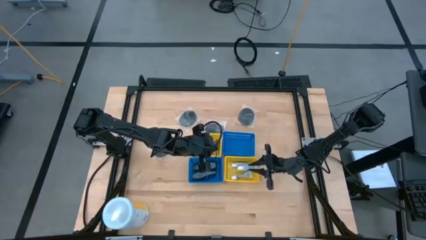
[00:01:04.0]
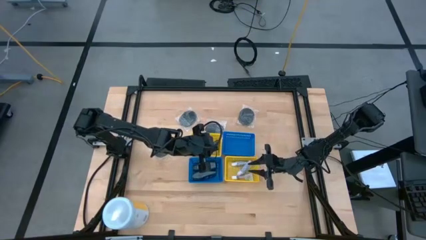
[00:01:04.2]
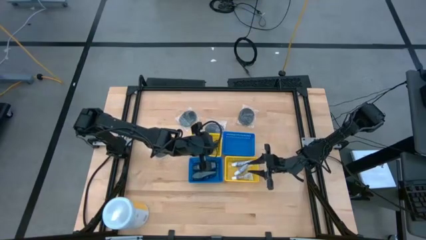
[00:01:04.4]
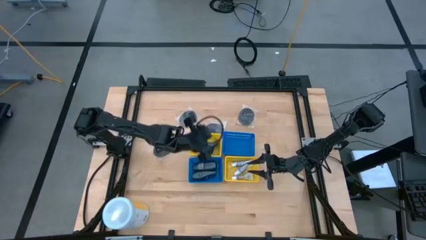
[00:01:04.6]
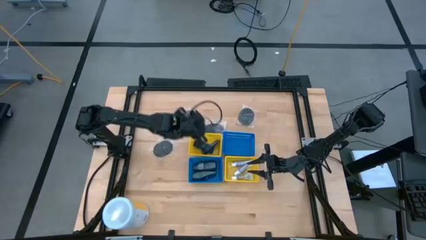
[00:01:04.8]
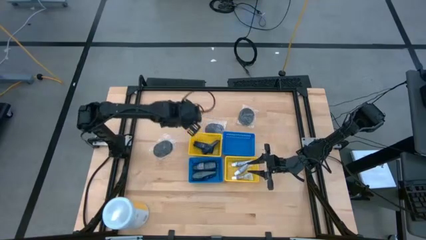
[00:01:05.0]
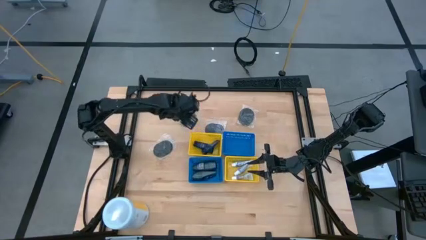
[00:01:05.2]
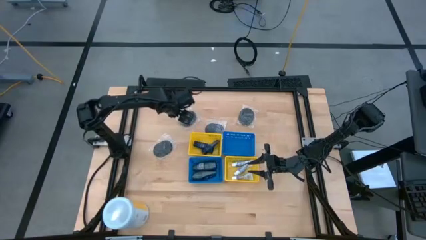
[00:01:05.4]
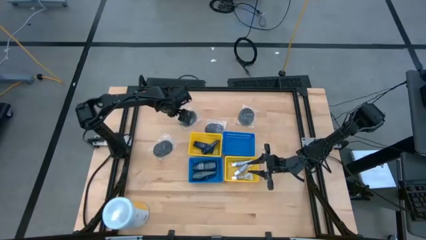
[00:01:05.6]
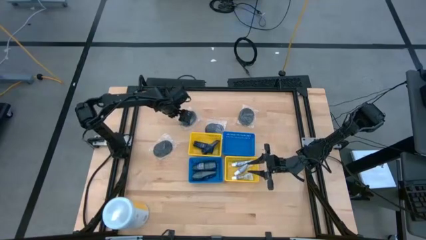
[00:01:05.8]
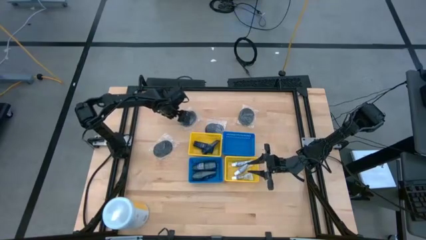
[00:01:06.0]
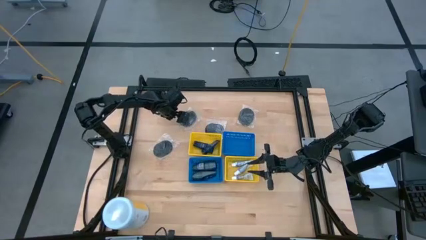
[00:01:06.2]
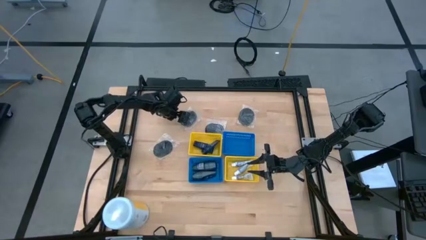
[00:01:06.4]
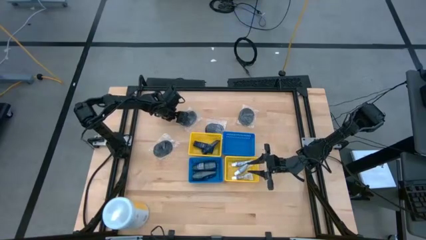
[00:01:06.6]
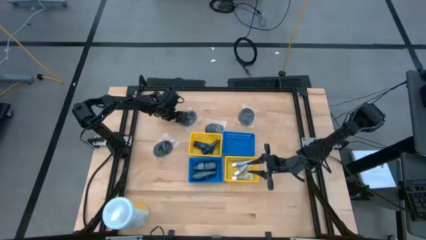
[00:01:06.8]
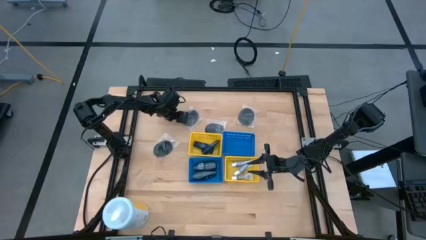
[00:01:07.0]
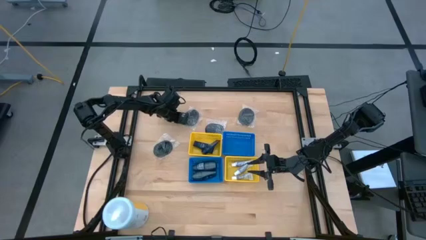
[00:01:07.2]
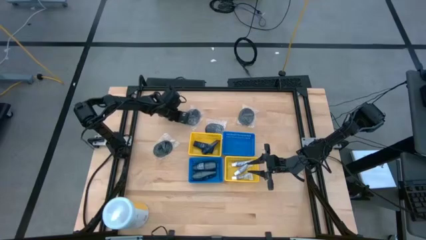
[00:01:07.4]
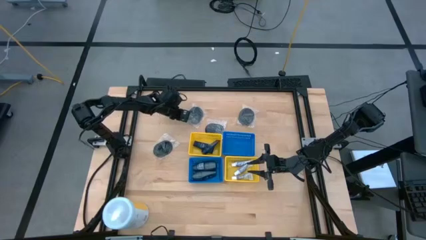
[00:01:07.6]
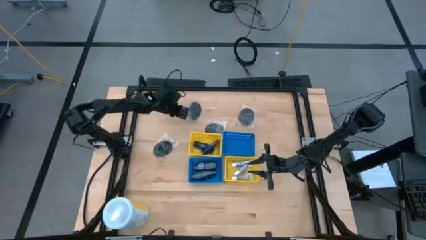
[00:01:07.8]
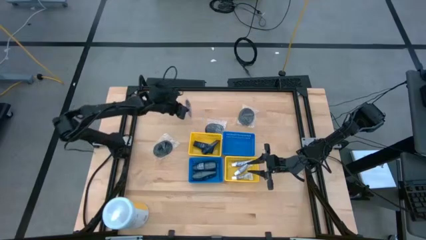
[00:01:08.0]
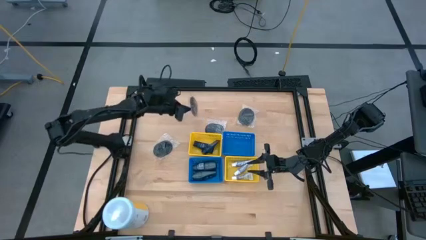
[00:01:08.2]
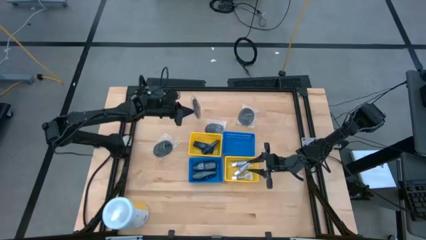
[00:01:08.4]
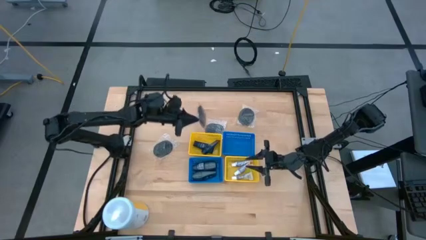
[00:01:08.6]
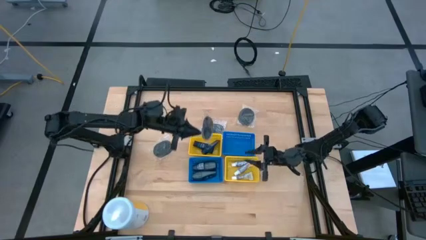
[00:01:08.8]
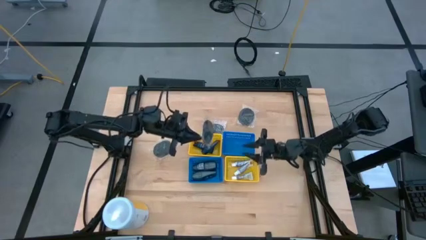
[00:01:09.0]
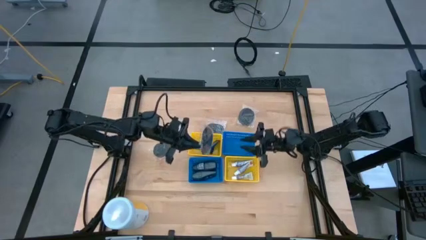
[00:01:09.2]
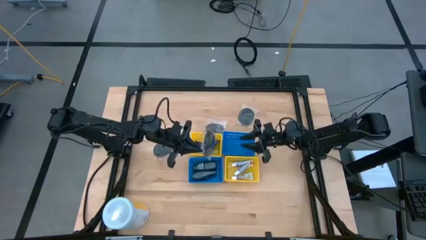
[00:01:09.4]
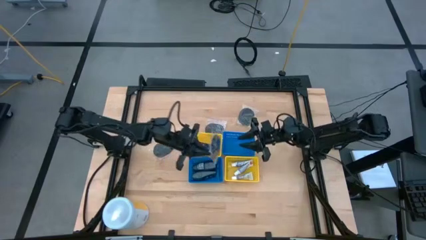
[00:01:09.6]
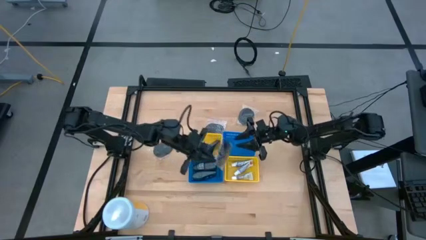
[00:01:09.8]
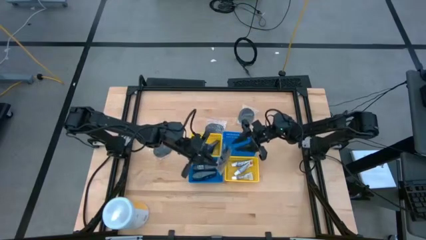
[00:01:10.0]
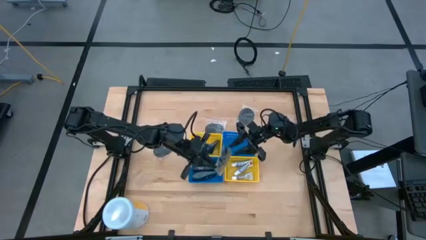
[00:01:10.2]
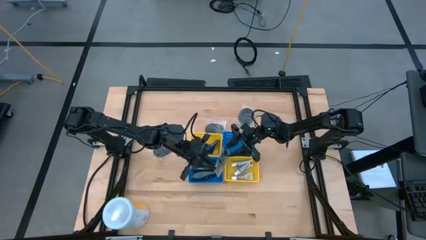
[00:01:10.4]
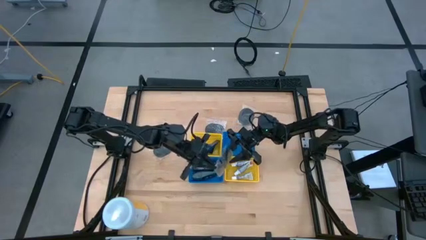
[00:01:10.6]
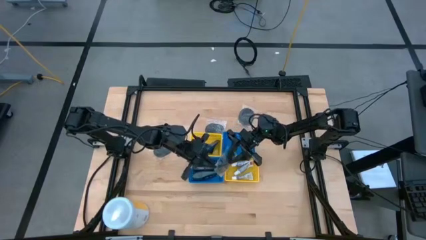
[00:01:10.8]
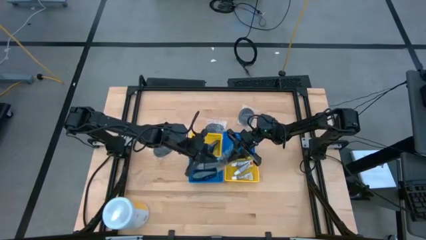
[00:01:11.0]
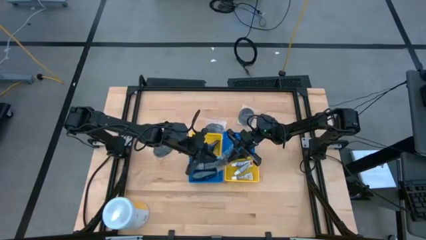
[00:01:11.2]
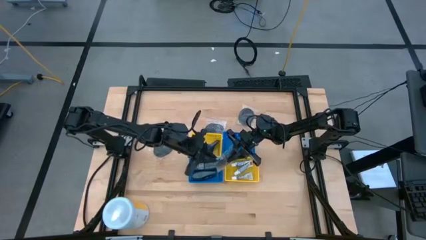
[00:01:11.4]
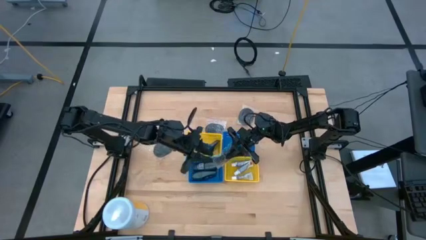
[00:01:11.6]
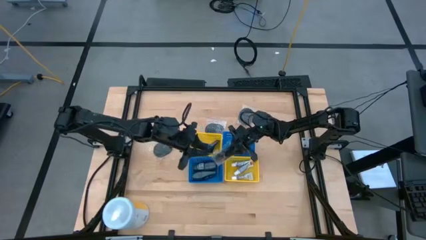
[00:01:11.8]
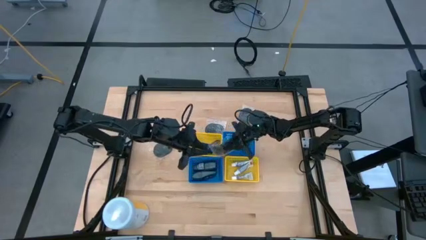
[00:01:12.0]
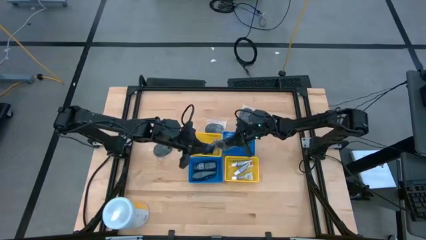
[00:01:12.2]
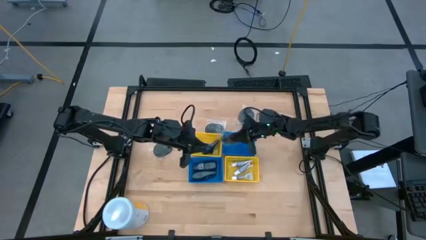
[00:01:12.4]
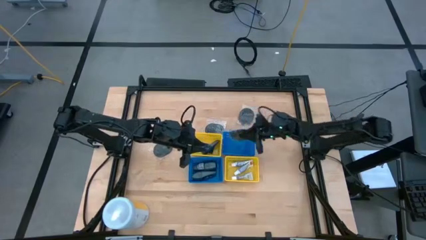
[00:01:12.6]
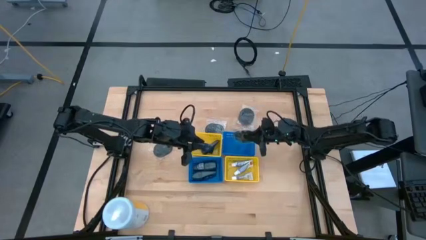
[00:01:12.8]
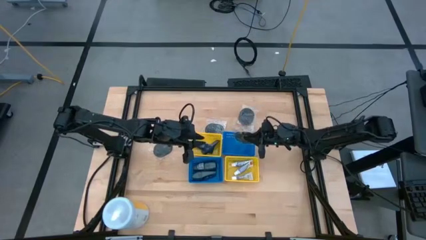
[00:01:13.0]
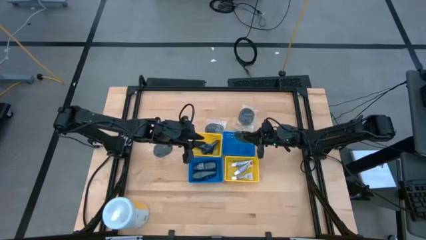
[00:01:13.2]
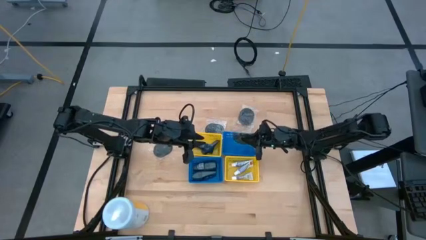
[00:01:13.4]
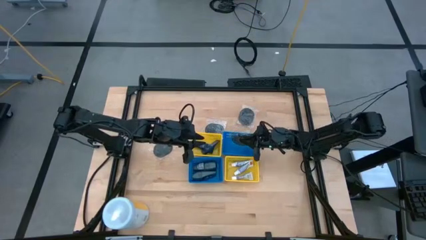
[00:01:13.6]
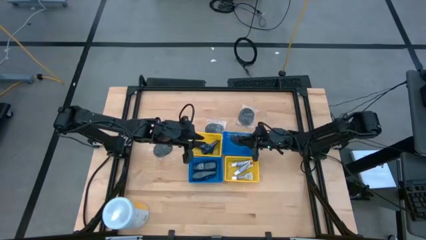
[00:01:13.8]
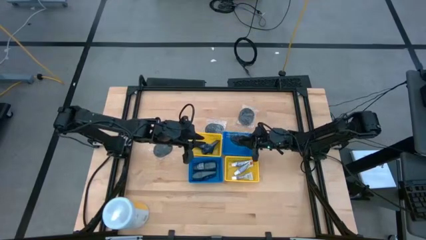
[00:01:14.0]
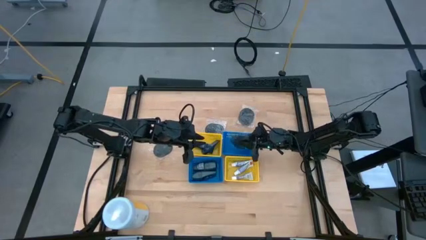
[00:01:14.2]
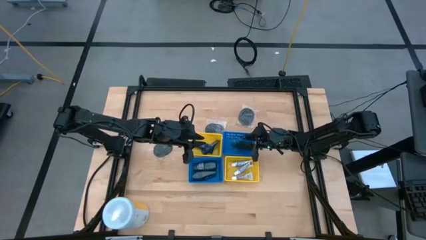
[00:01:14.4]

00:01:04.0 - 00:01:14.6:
Task: Pick & Place Travel size toiletries
Put the black hairbrush into the right blue bin

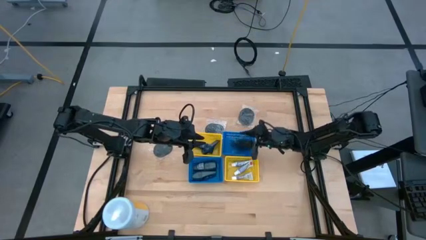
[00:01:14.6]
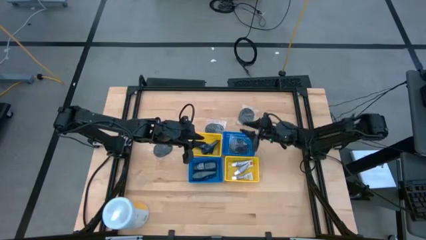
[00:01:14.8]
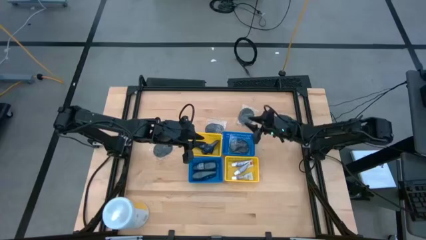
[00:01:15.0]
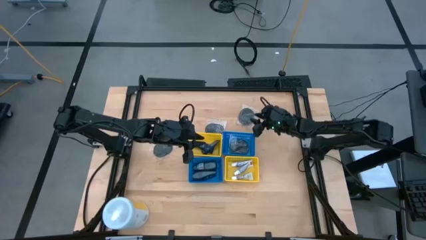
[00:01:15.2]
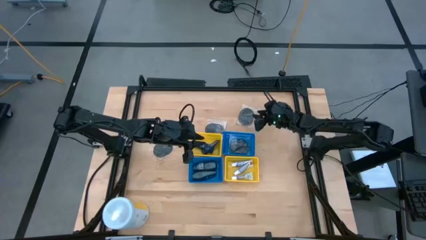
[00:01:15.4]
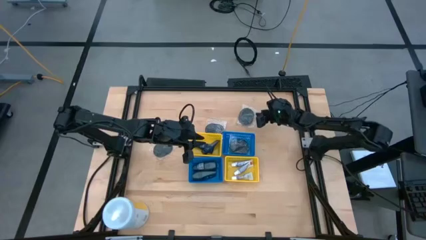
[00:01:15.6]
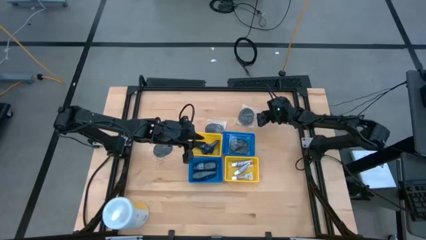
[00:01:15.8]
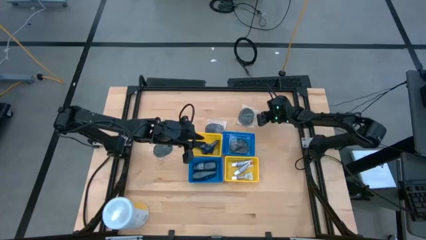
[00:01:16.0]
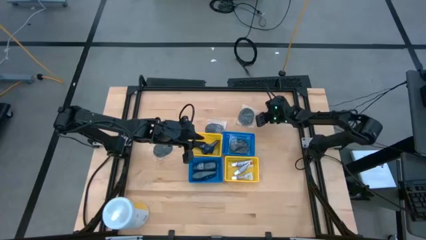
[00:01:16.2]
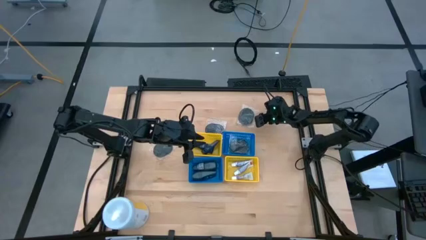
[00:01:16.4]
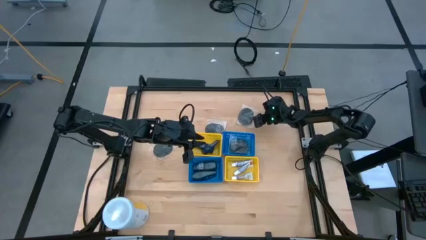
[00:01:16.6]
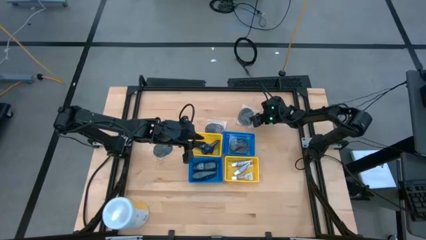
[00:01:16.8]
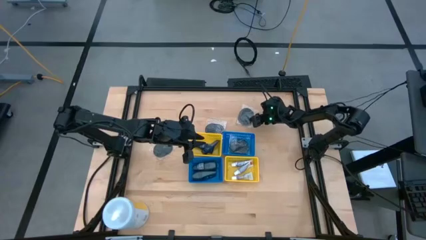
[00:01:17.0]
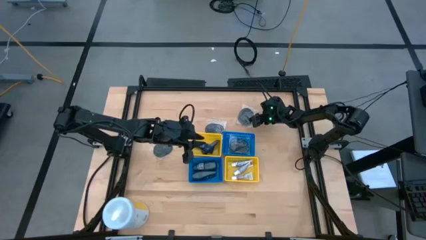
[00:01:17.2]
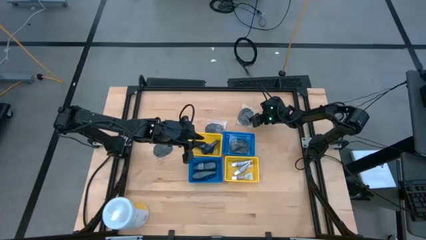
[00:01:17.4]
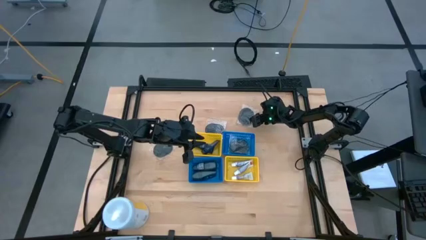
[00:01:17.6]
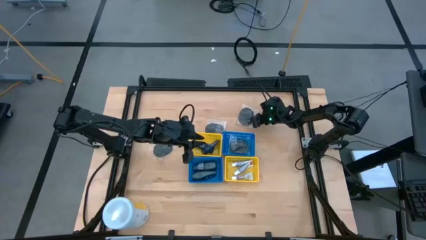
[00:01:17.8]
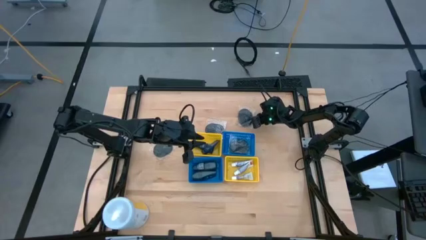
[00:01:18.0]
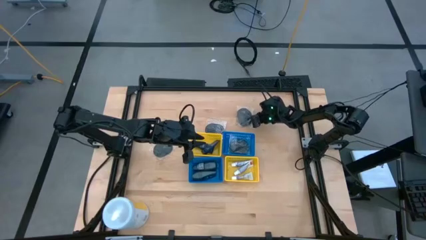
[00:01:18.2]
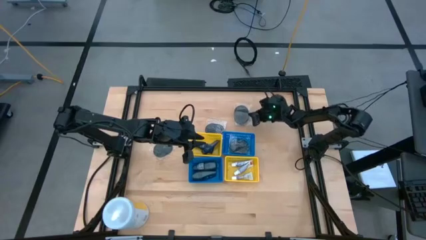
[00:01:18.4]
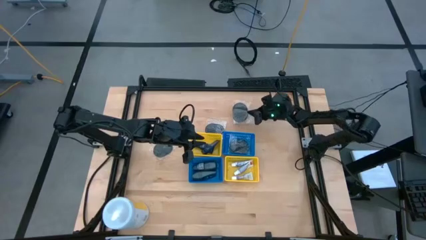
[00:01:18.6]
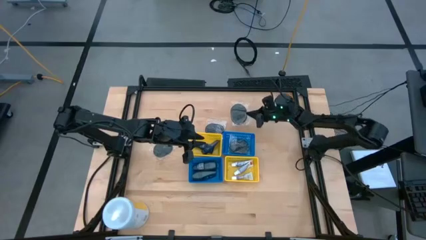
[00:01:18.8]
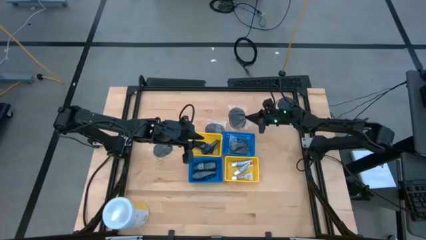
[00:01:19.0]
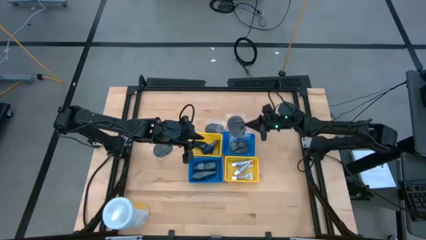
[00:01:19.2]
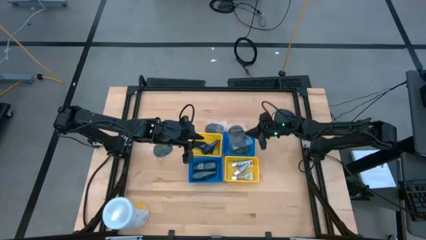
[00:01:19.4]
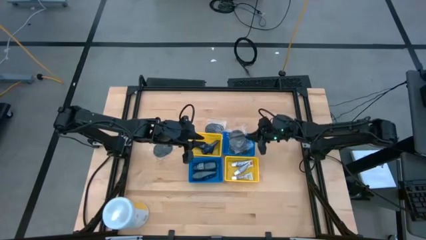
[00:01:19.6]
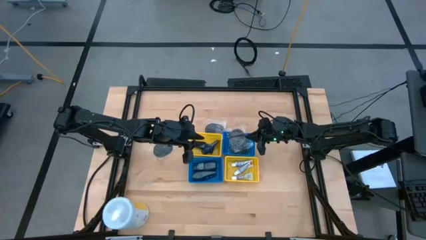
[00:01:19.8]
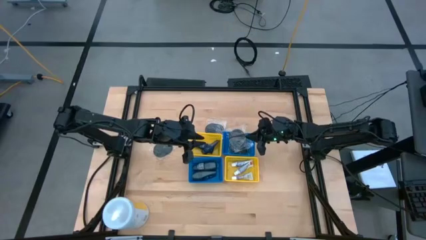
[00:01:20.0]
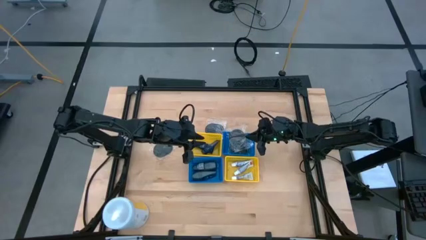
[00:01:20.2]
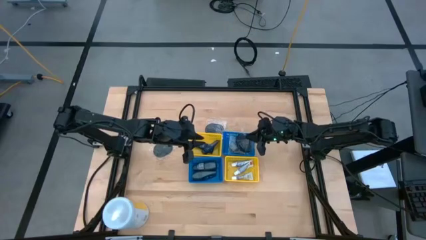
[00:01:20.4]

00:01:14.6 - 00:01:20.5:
Put the black hairbrush into the right blue bin
